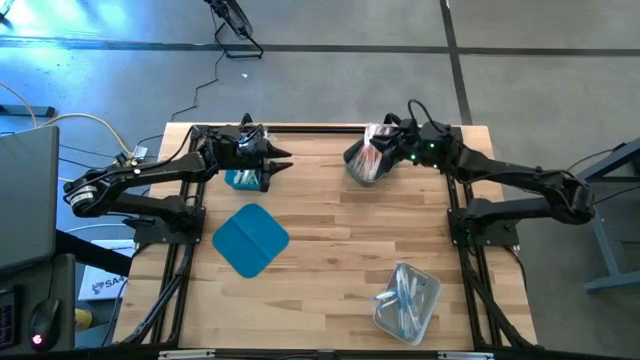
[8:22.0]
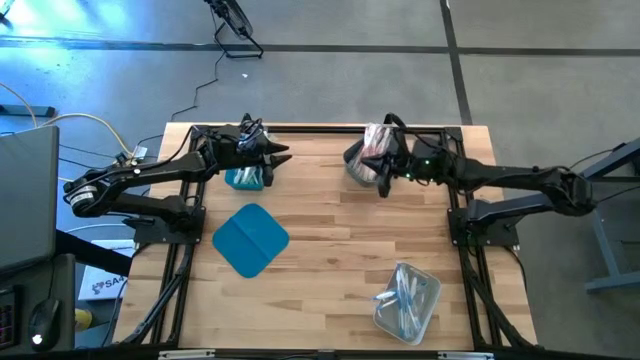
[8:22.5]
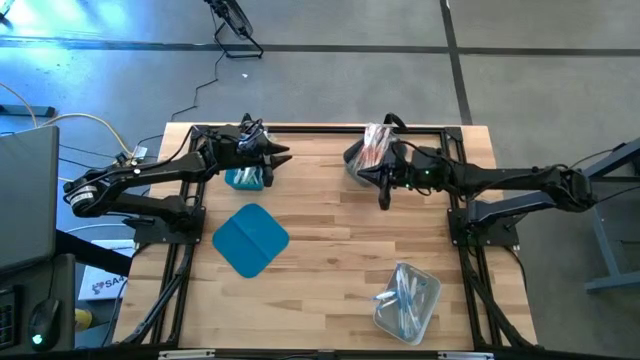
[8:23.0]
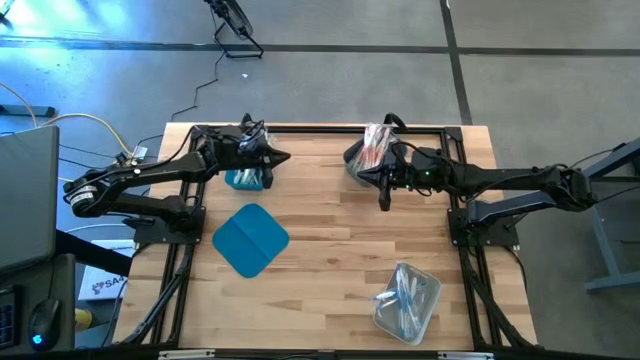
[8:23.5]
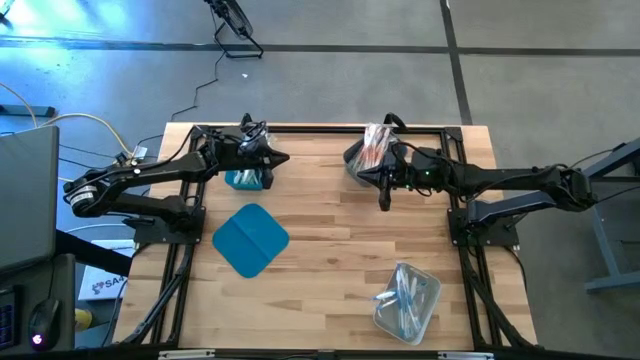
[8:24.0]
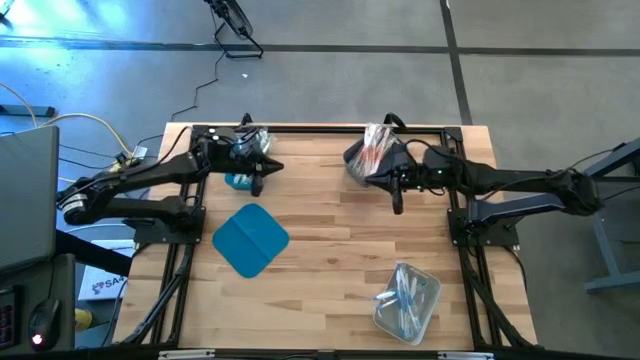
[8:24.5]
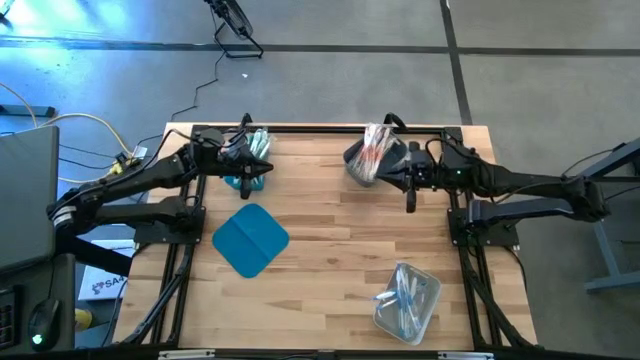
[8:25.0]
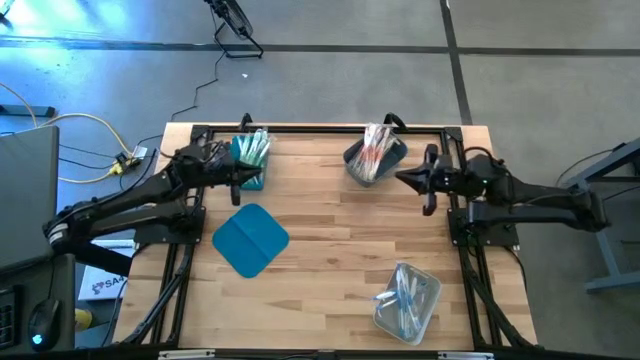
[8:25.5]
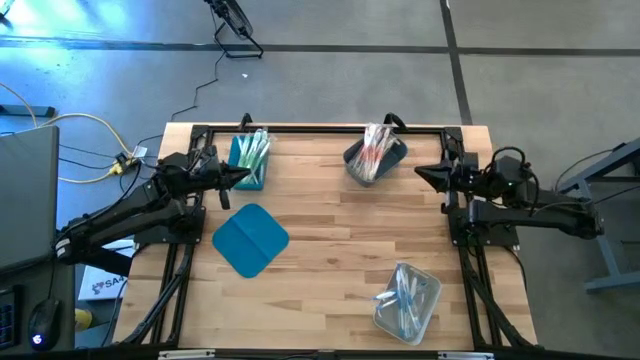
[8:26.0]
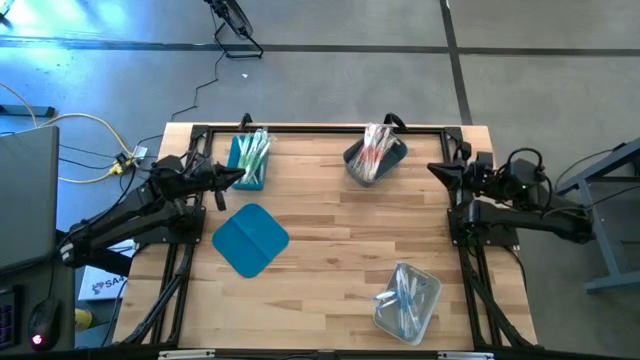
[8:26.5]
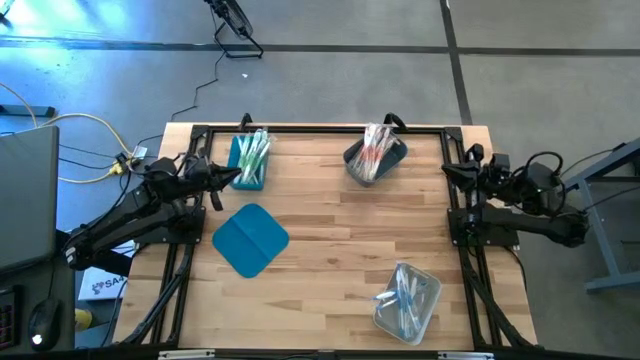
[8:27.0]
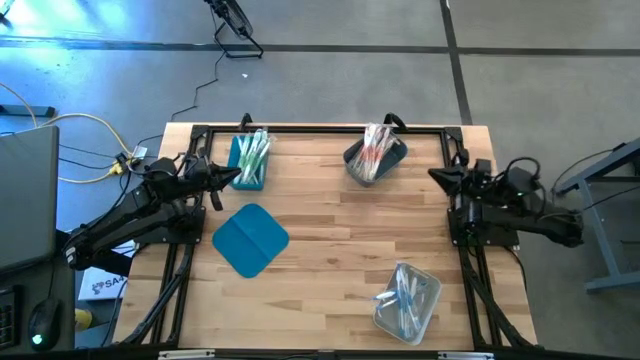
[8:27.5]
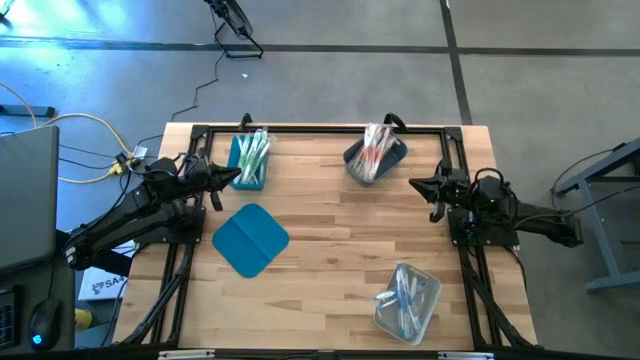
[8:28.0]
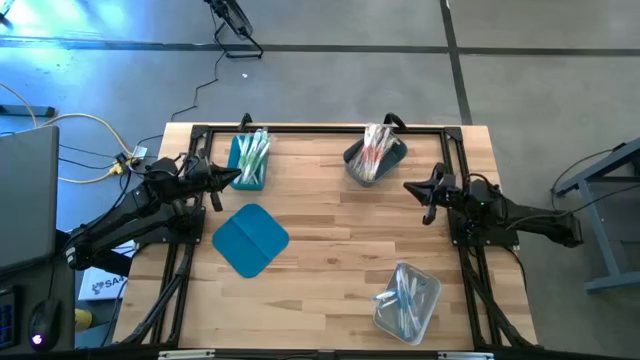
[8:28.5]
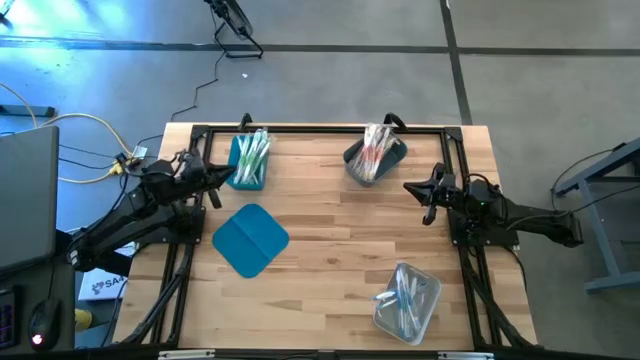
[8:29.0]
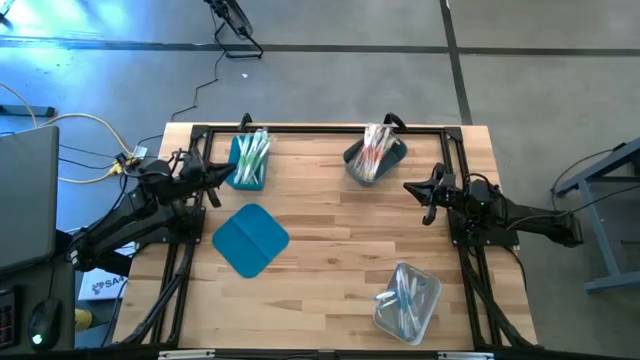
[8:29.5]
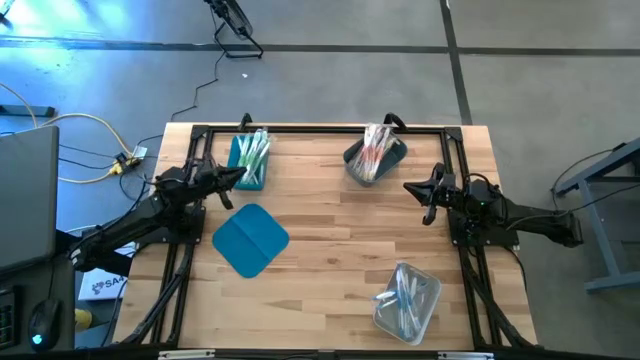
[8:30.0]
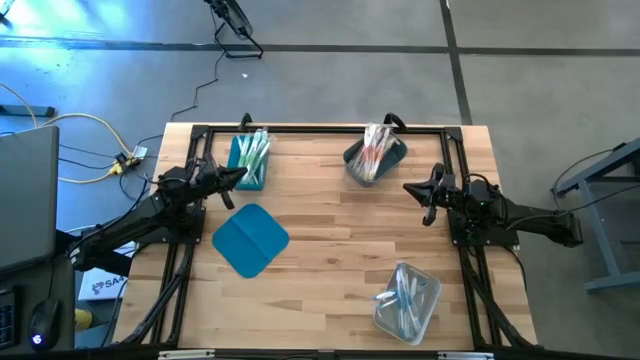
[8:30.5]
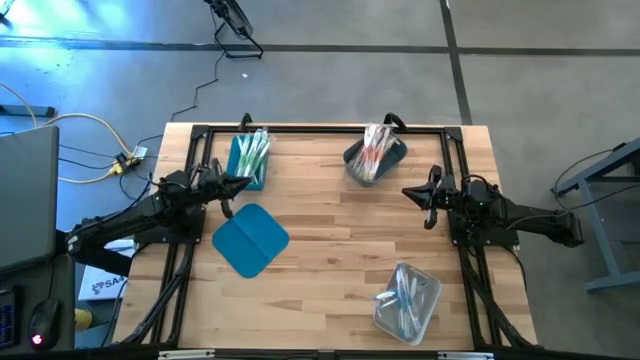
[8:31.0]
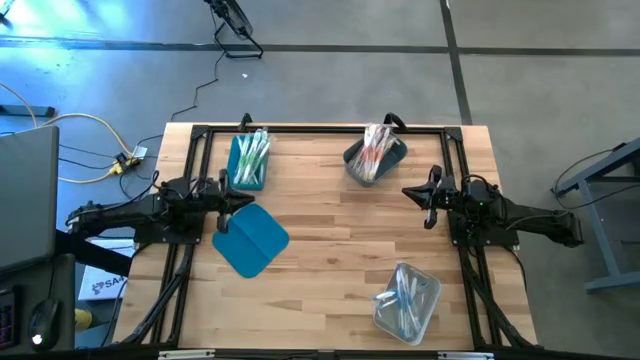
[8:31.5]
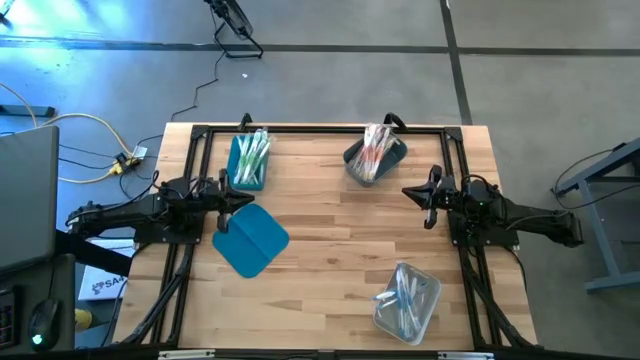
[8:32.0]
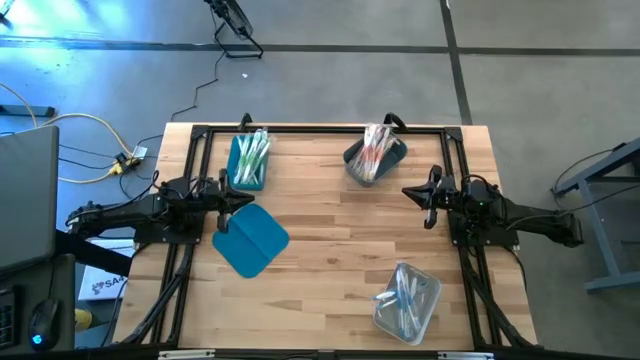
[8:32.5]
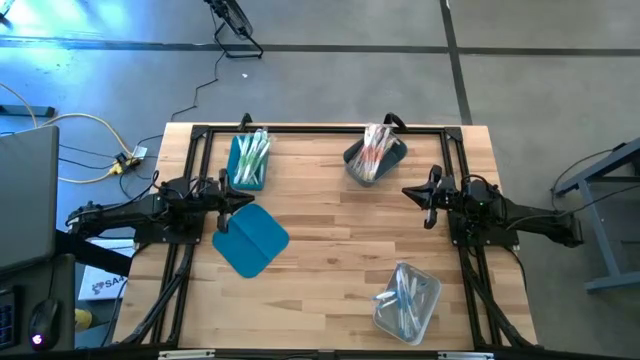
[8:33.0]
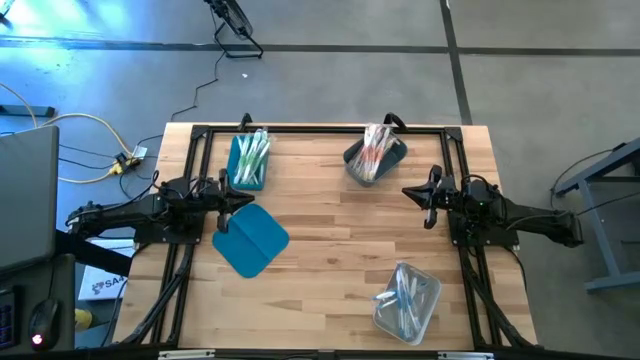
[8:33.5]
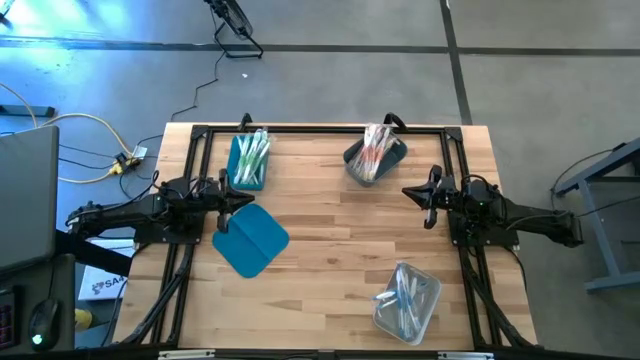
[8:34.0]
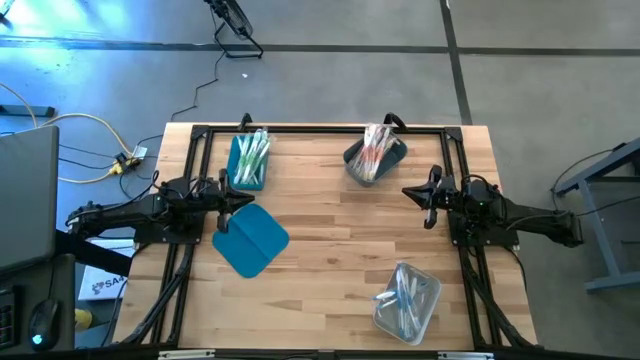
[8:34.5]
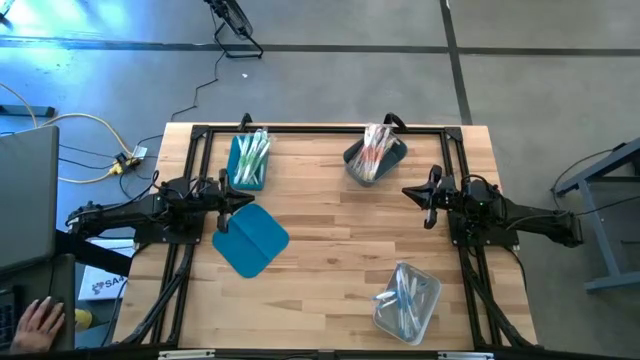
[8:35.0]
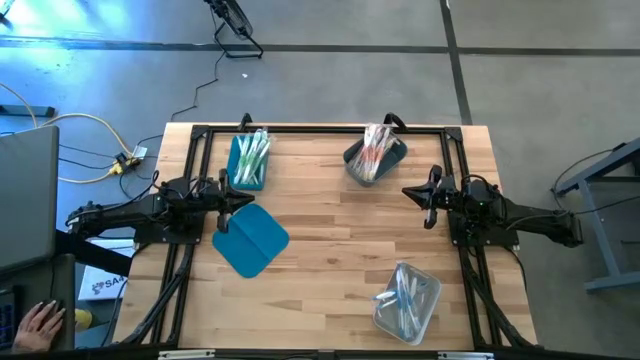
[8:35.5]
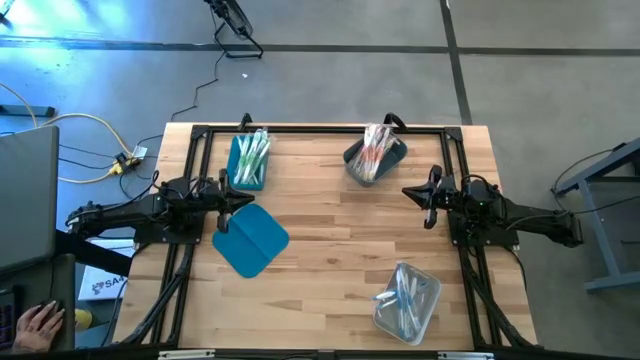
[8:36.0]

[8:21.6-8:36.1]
Task: Pick & Place Toothbrushes
Return to Home Position

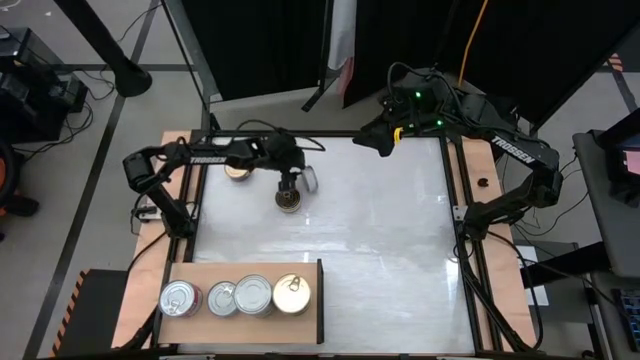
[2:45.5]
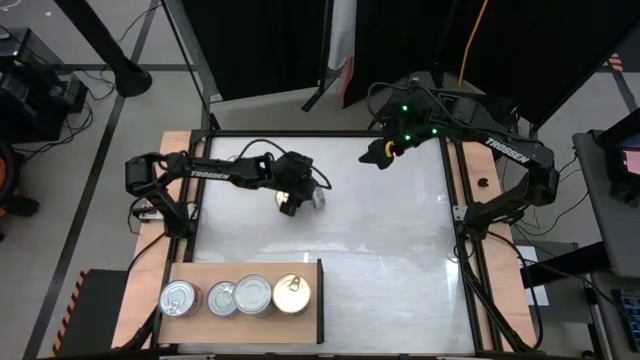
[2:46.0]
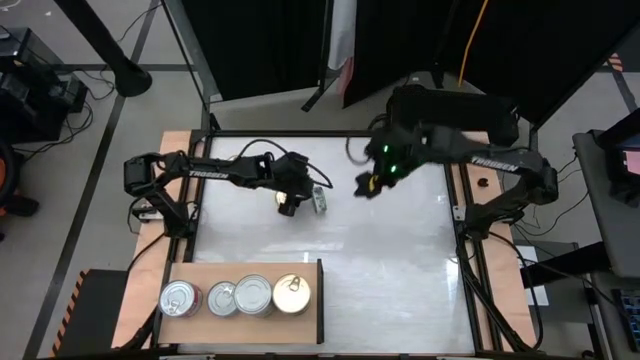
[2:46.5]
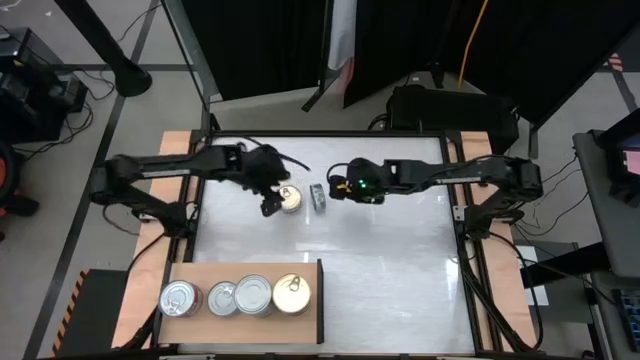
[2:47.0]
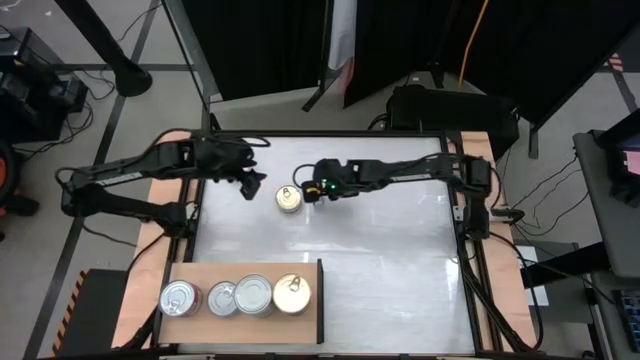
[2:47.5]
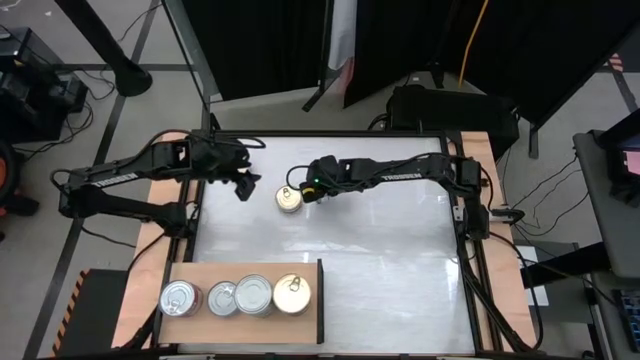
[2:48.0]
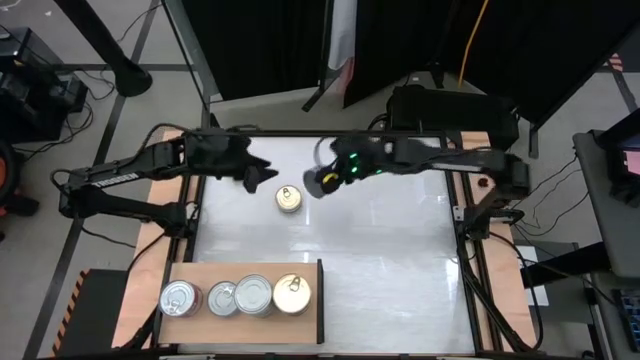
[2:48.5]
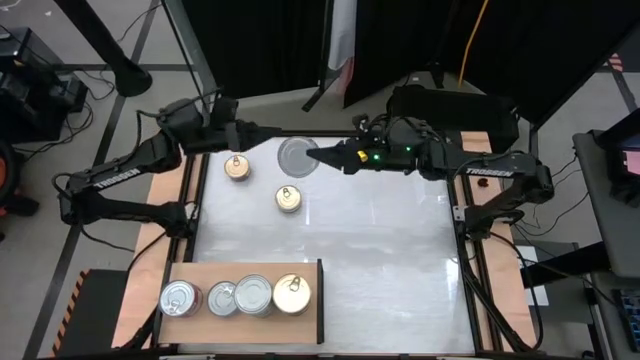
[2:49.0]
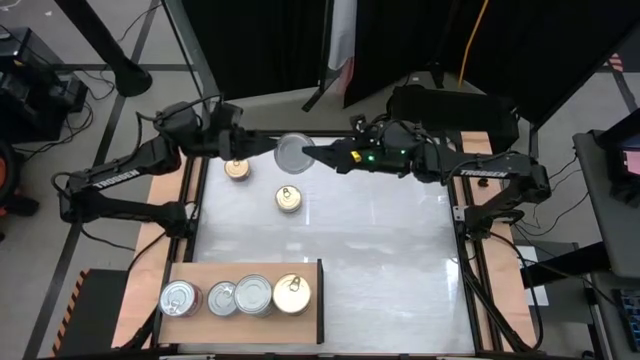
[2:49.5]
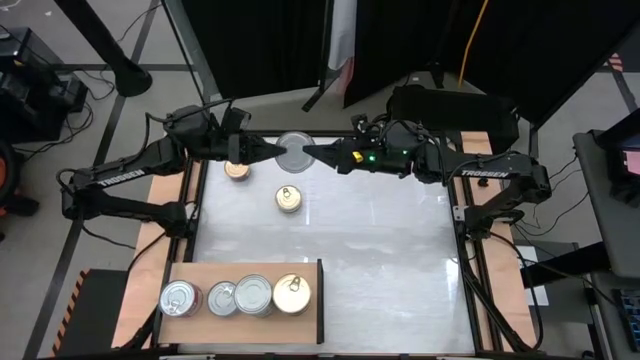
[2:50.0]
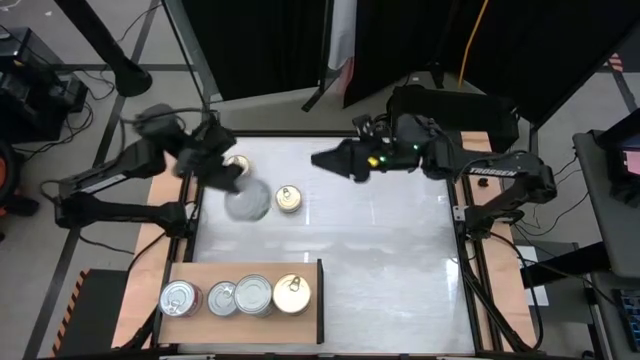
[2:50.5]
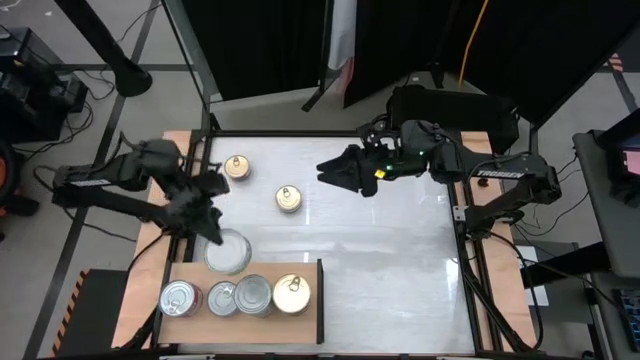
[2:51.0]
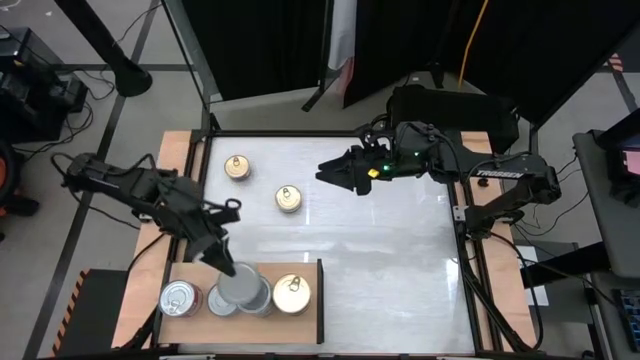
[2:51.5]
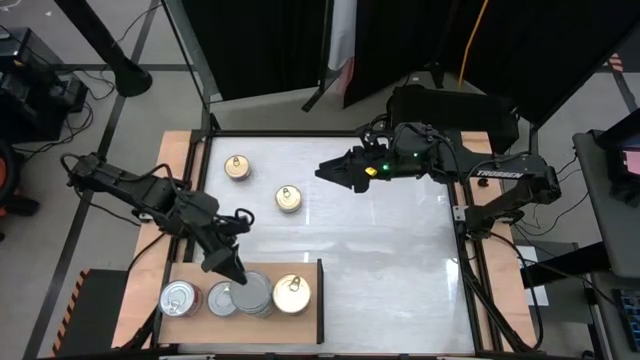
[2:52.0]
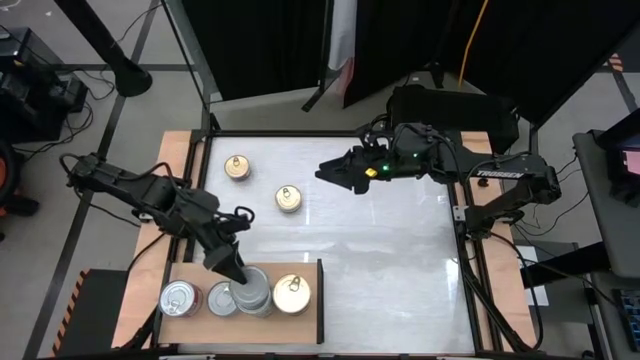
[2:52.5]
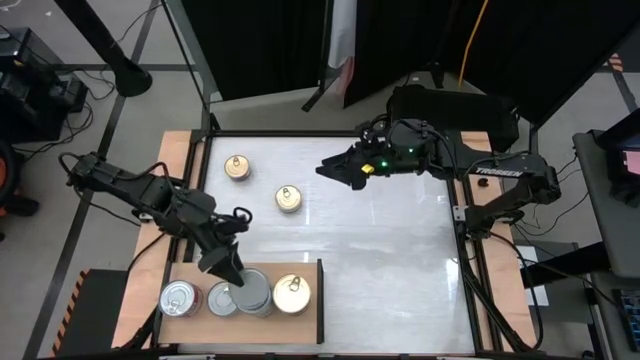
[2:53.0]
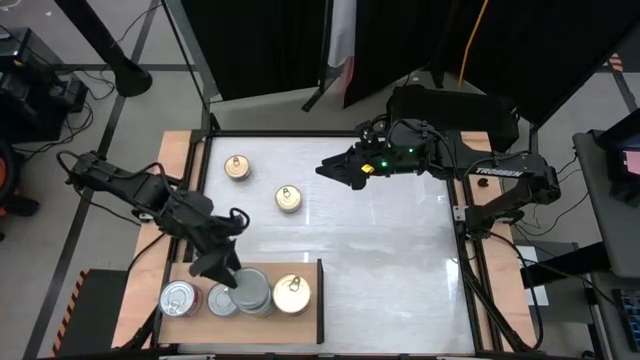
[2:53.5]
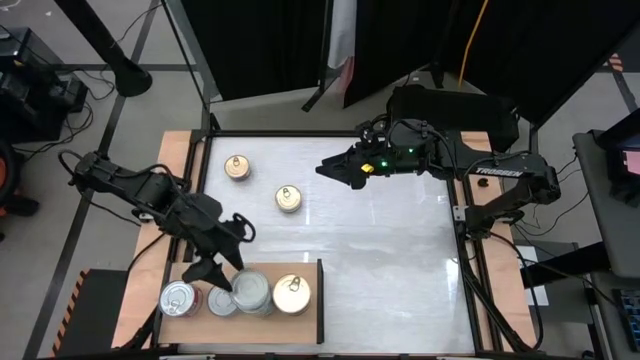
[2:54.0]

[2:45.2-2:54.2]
Task: Stack canned seafood by type on shelf
Stack the green white tuna can on top of the other green white tuna cans on the shelf
